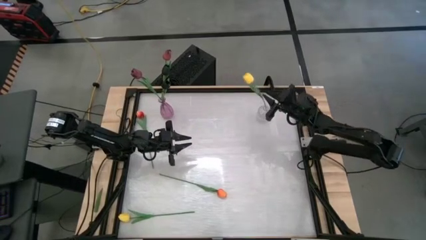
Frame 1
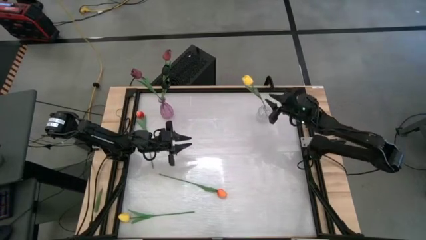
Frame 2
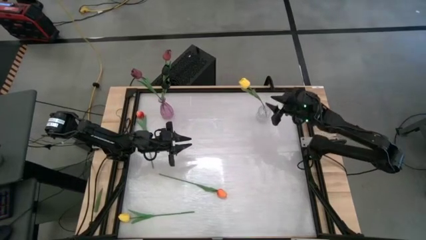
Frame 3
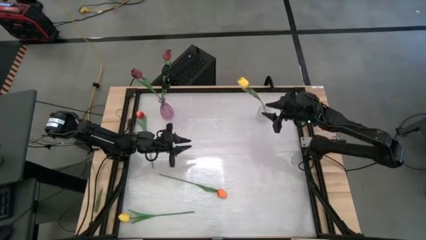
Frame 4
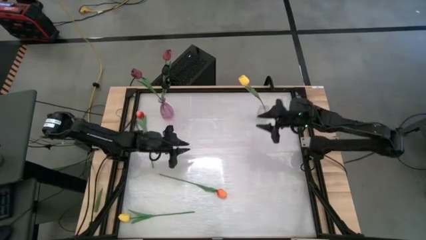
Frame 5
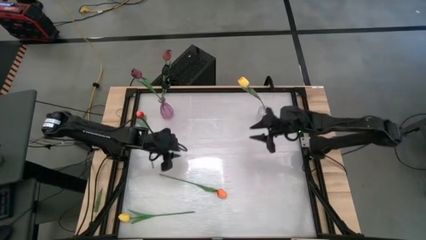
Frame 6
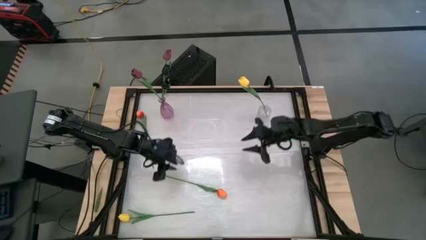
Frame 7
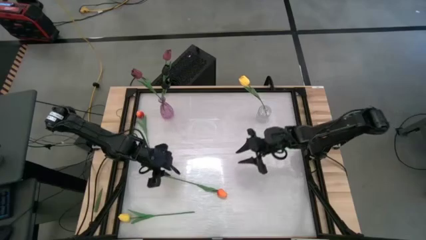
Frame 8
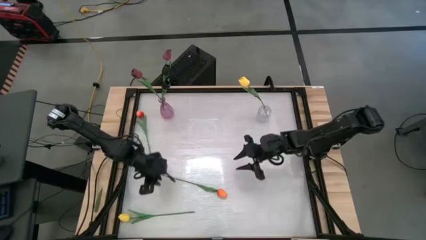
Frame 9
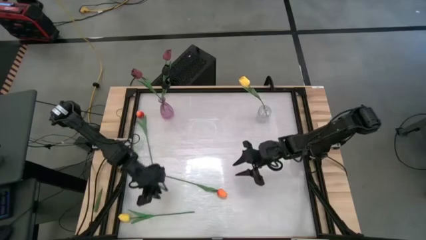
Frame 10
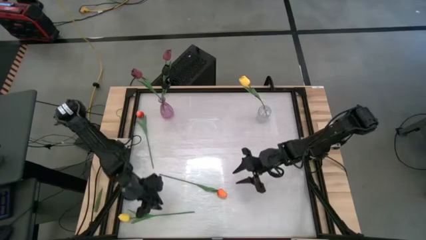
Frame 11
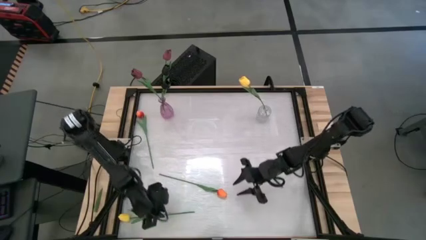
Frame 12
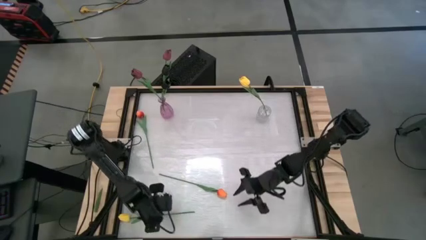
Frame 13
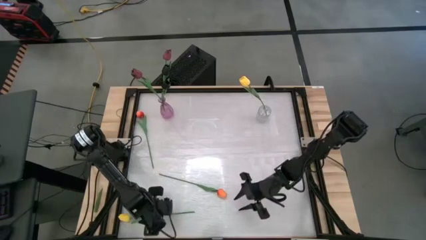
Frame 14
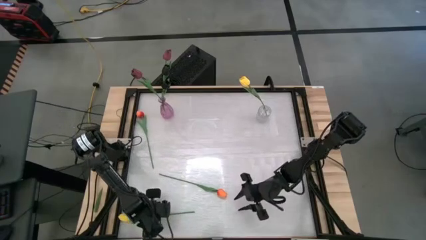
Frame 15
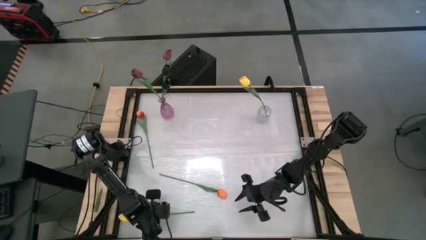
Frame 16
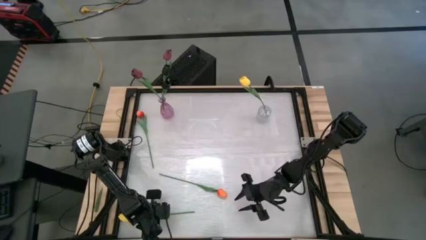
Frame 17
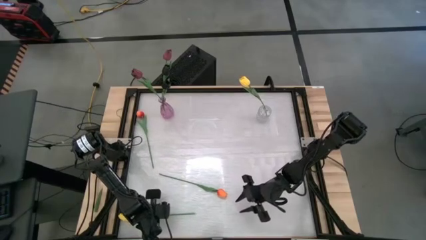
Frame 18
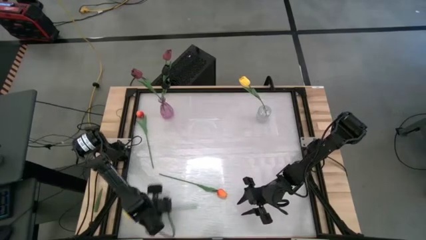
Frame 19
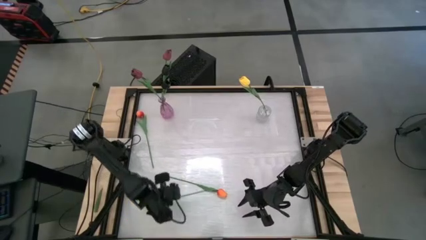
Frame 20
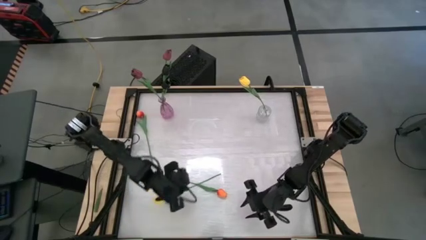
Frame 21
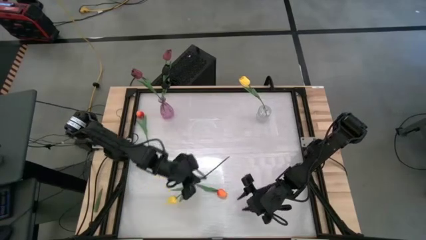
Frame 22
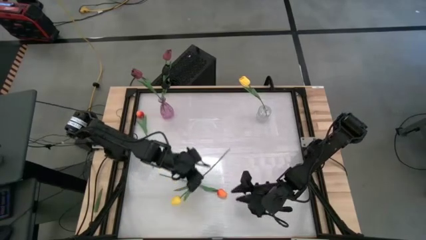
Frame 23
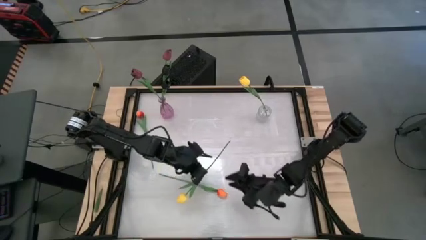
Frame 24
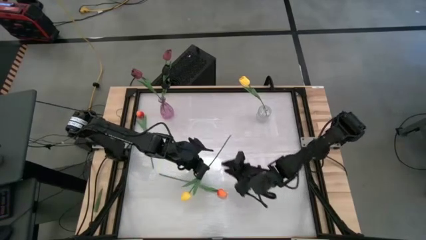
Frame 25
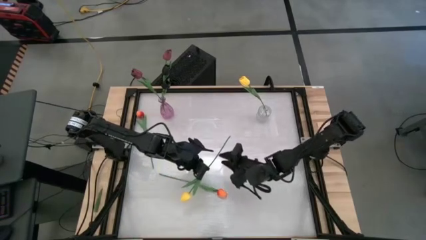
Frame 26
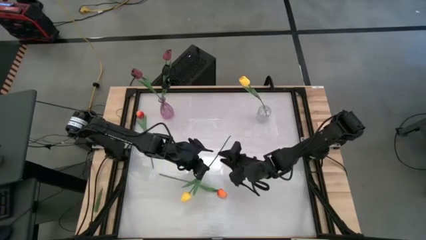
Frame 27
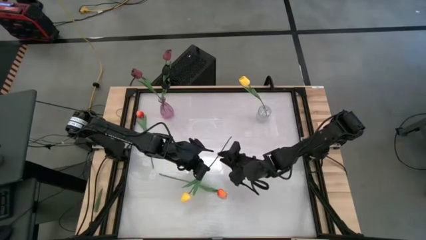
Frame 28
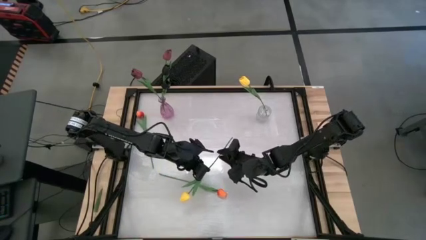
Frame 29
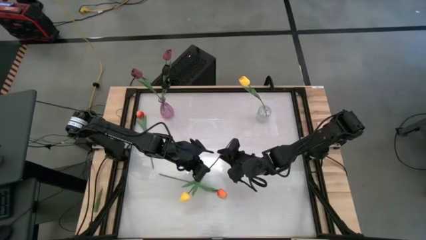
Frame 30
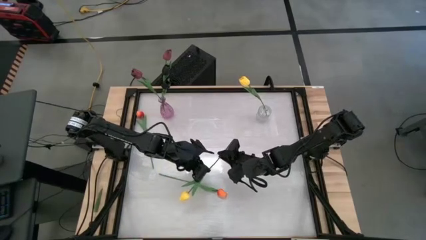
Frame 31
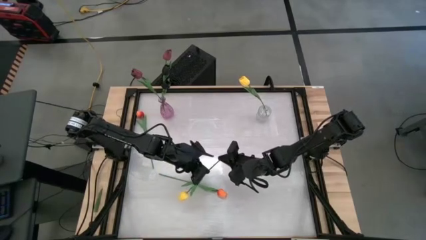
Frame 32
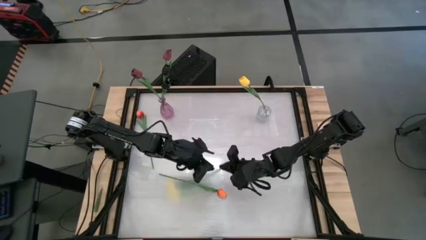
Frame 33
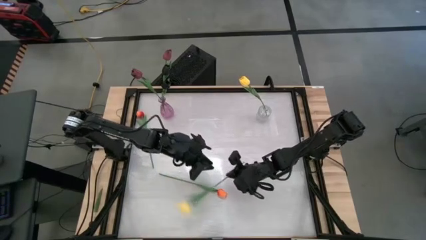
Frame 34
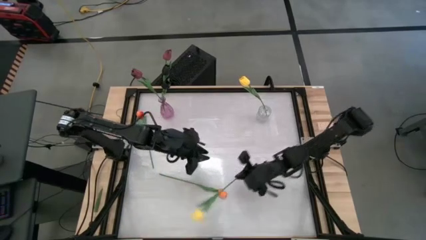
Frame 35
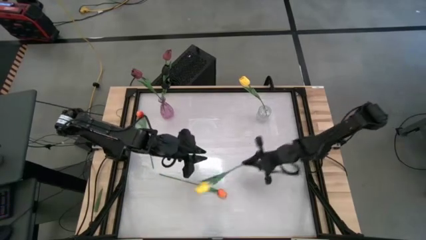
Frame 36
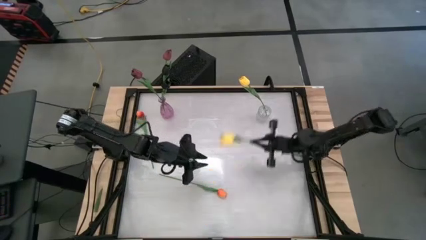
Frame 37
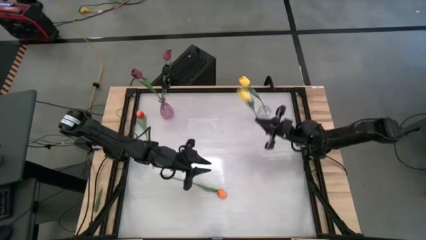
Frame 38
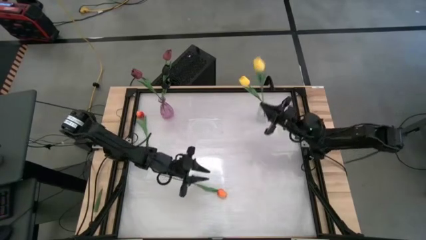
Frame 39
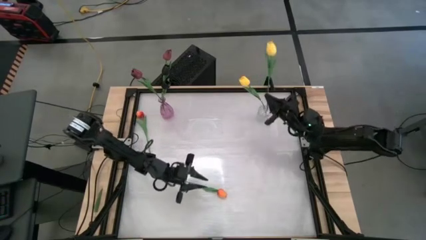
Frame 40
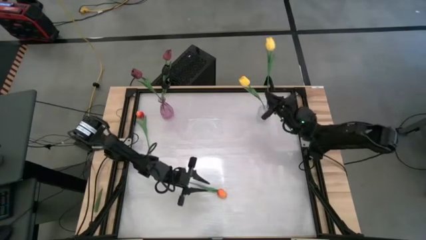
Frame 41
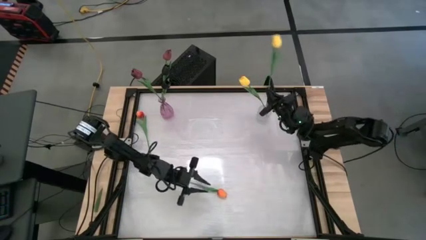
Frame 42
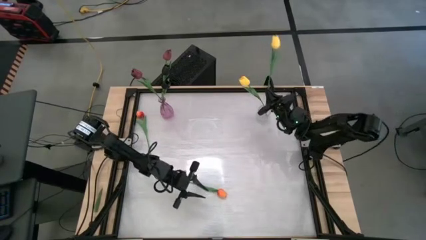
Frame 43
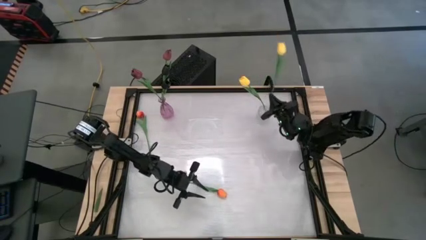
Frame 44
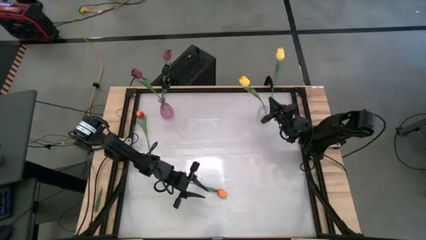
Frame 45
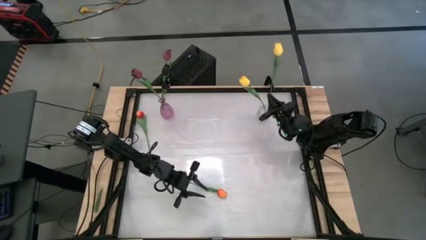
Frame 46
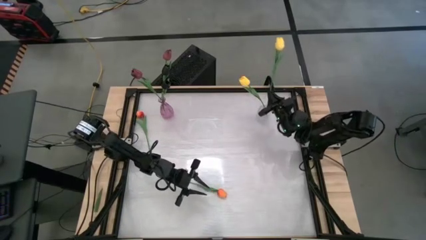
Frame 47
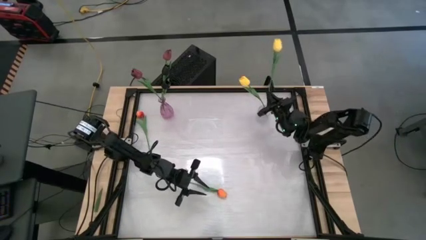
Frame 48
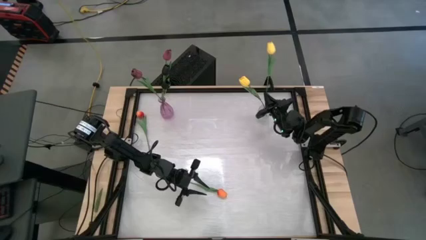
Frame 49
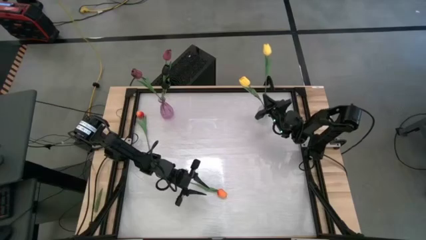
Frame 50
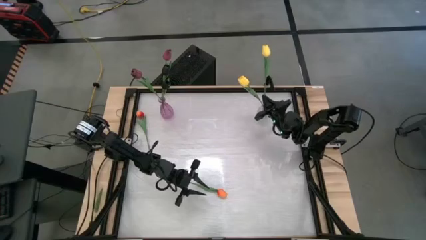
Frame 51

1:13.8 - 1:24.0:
Task: Sort flowers into vase by color
Put the yellow tulip into the transparent vase

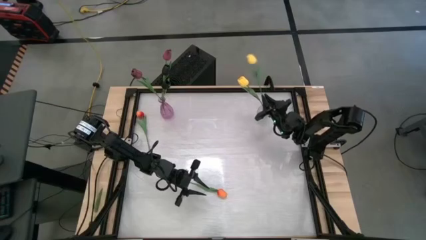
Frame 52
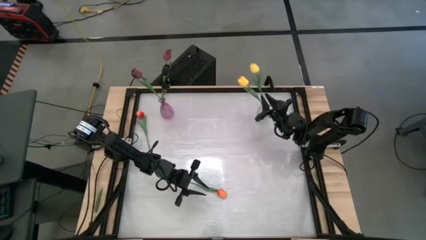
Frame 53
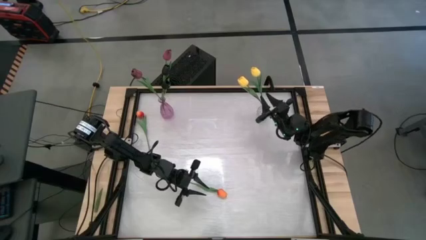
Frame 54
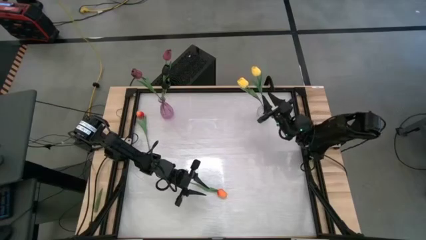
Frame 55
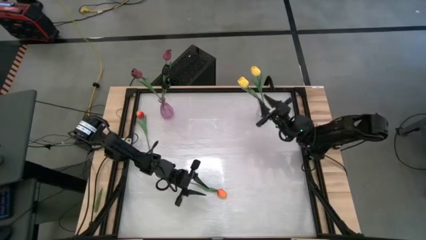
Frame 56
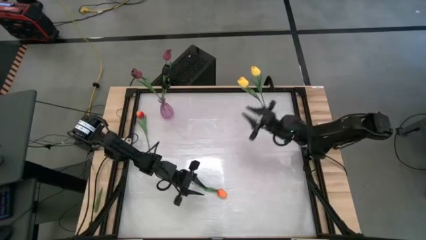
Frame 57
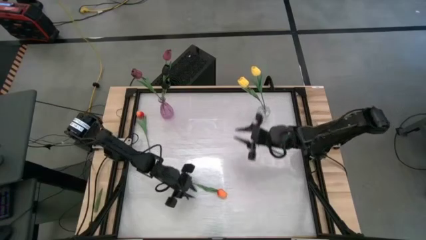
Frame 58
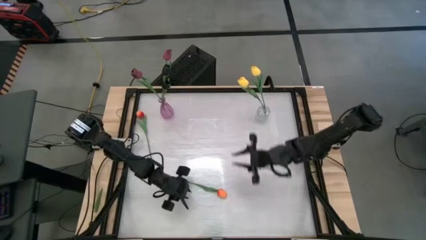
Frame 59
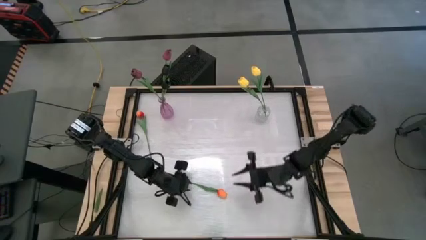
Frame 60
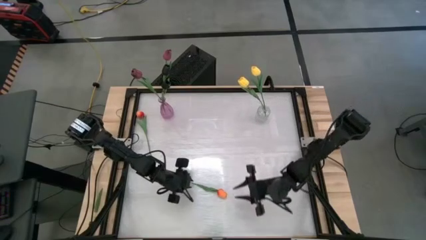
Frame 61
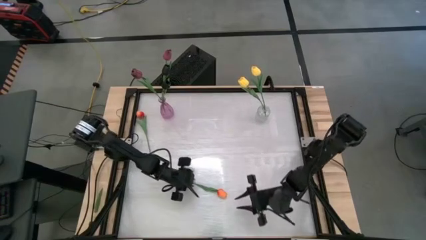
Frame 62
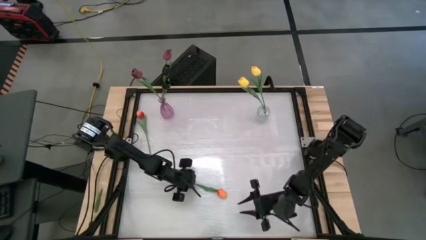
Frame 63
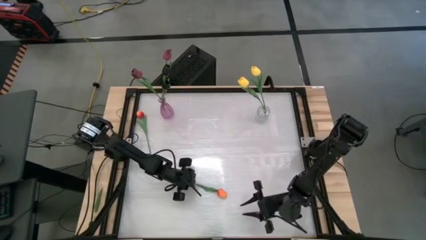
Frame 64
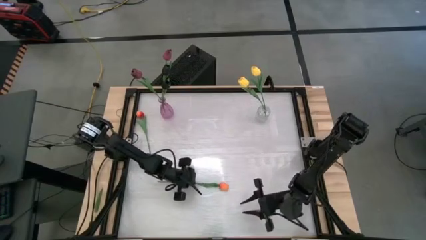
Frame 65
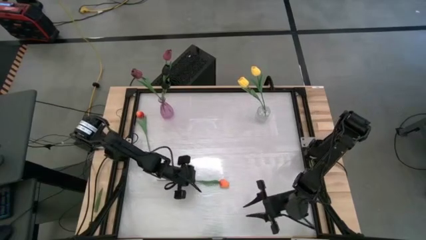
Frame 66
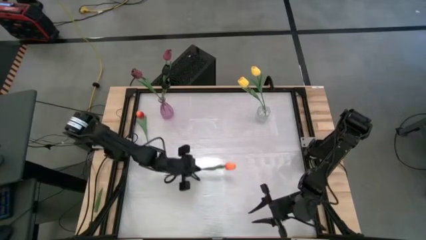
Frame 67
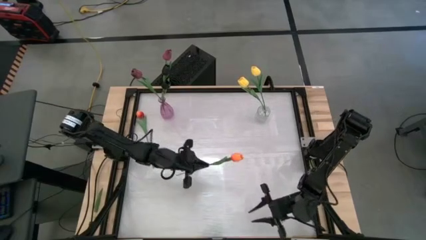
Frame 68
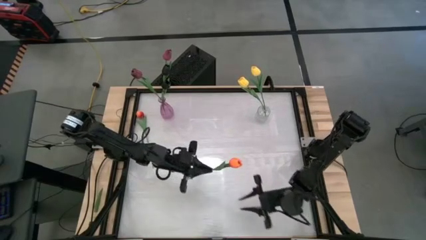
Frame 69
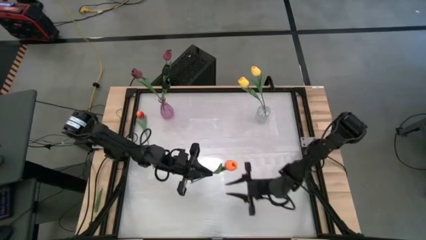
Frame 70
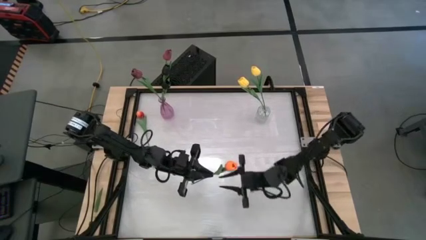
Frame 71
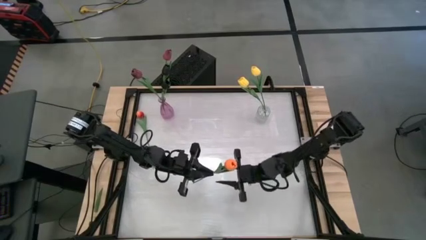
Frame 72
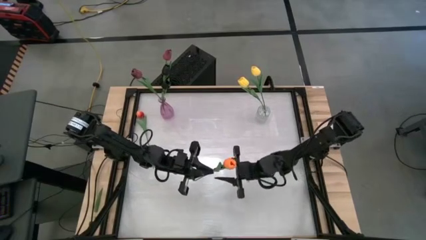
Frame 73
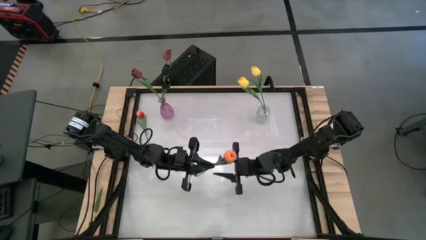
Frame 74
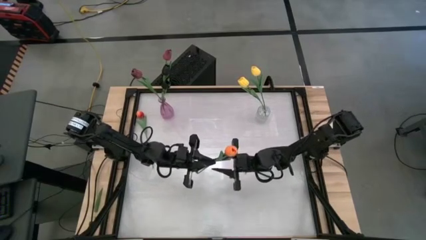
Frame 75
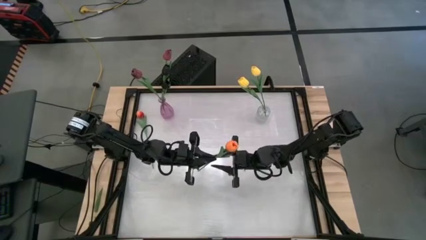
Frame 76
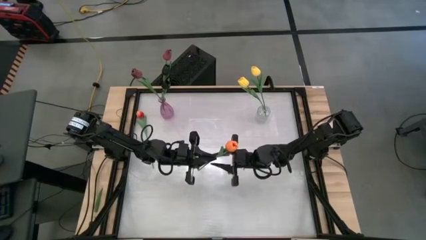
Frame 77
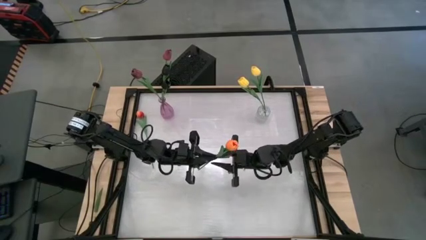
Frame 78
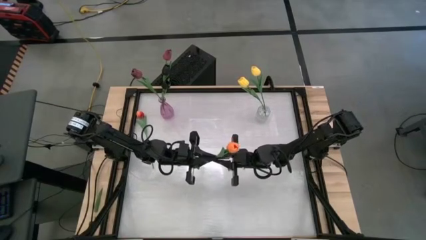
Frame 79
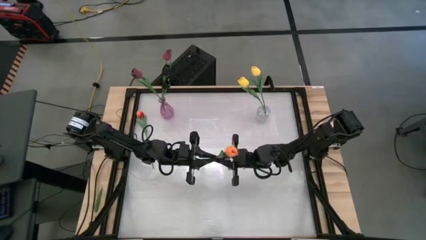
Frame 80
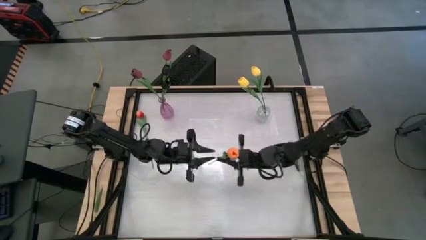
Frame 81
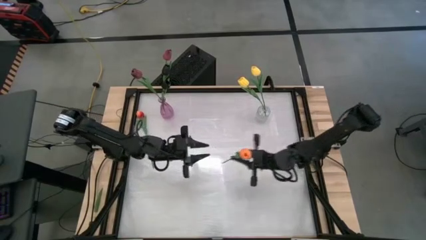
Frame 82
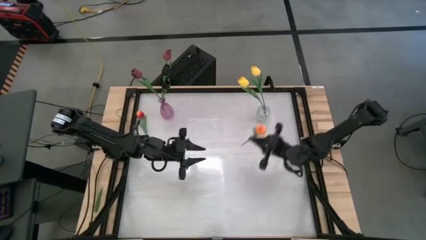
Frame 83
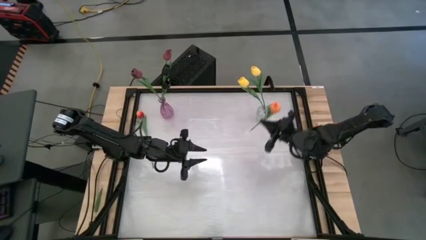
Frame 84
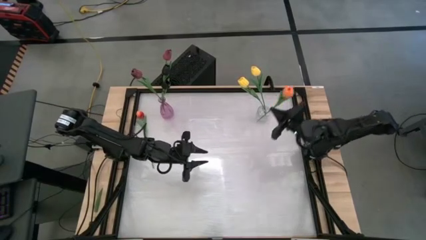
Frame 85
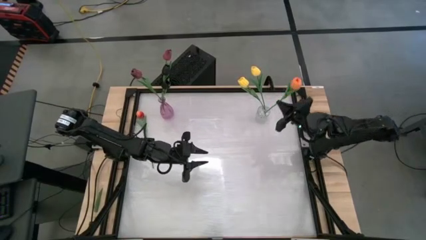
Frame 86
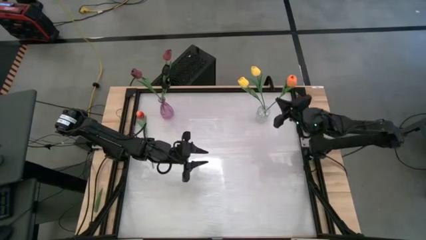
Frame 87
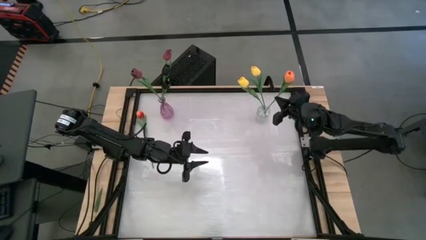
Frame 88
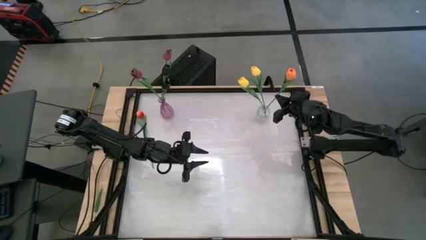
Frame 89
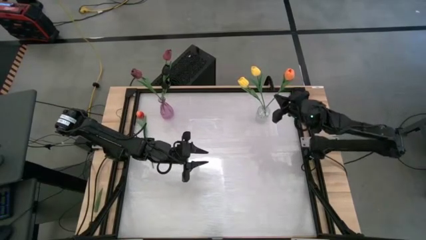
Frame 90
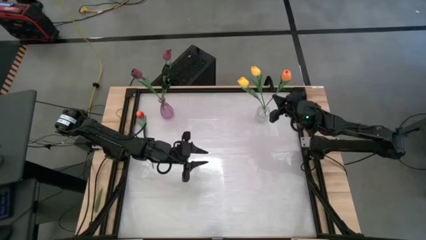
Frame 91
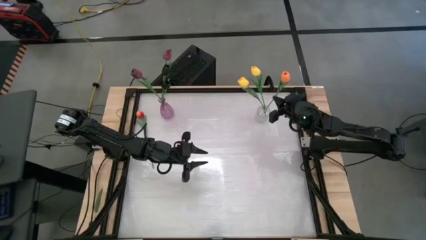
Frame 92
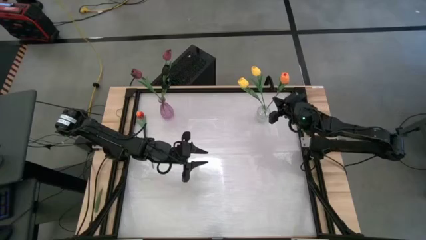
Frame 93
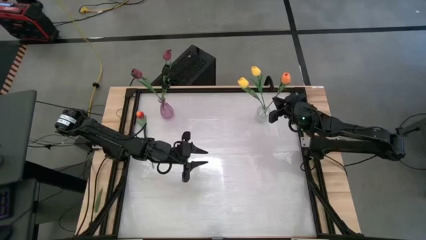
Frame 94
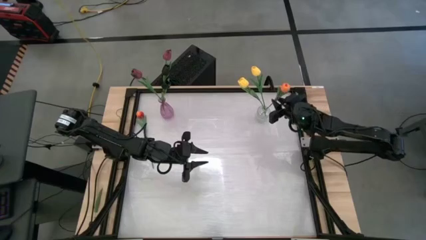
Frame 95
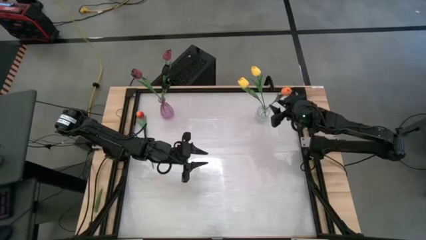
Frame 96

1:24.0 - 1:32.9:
Put the bottom orange tulip into the transparent vase
